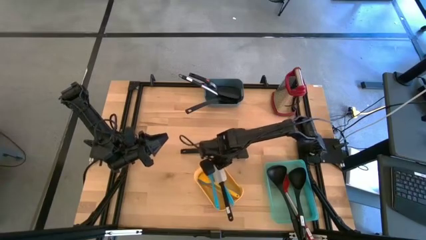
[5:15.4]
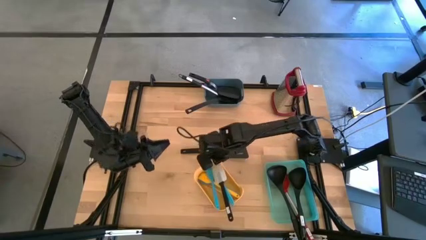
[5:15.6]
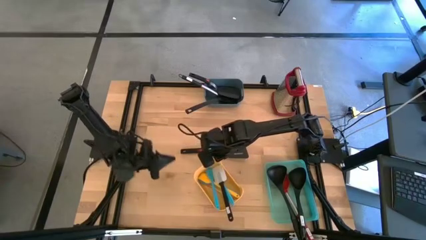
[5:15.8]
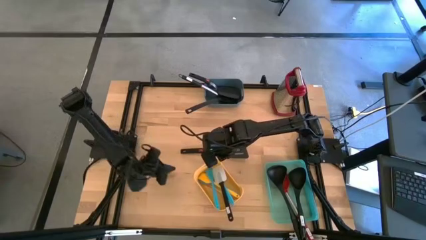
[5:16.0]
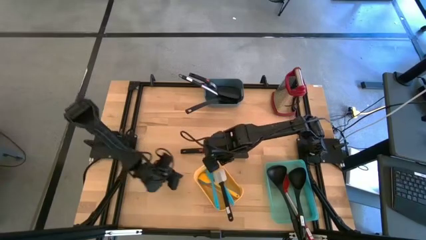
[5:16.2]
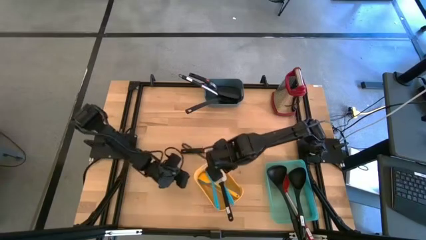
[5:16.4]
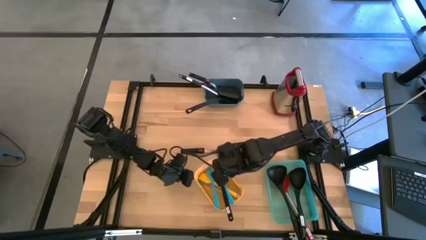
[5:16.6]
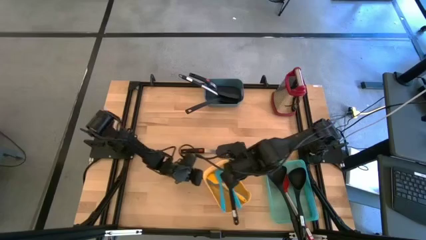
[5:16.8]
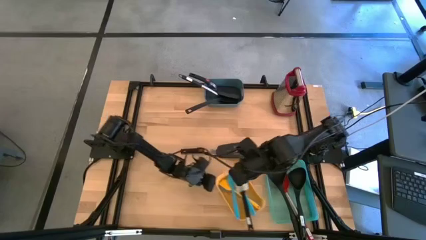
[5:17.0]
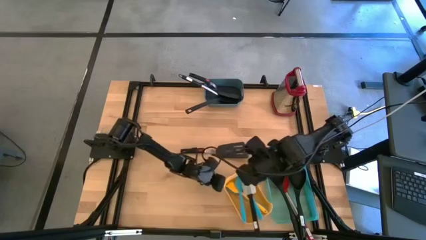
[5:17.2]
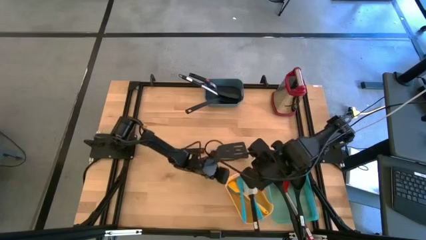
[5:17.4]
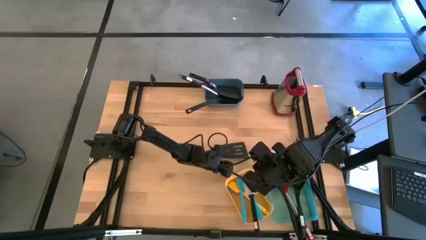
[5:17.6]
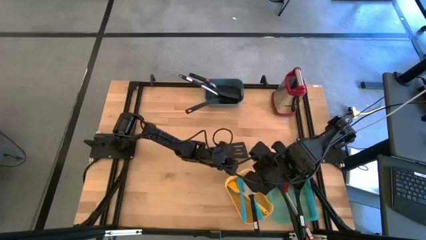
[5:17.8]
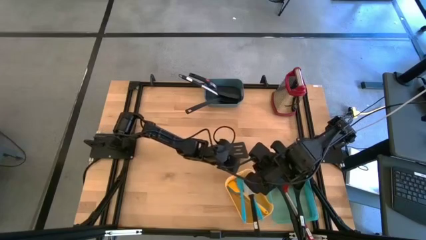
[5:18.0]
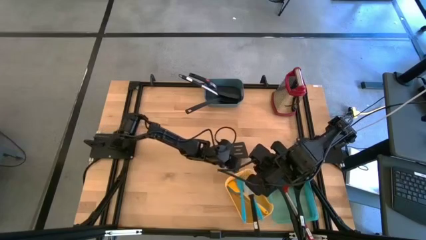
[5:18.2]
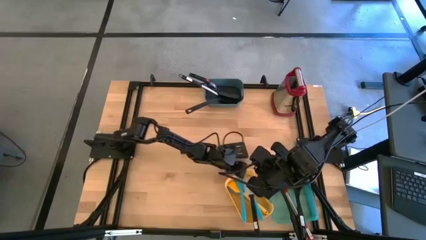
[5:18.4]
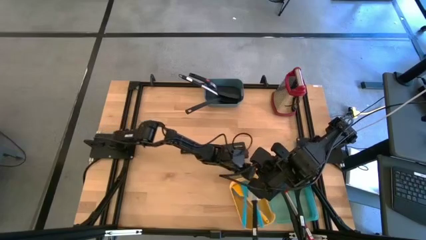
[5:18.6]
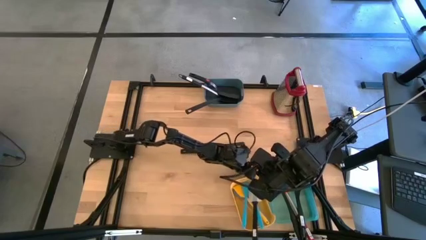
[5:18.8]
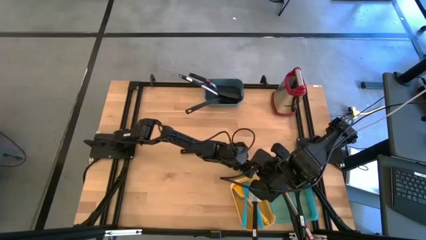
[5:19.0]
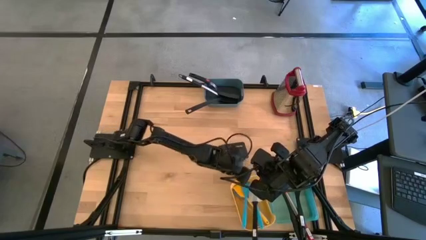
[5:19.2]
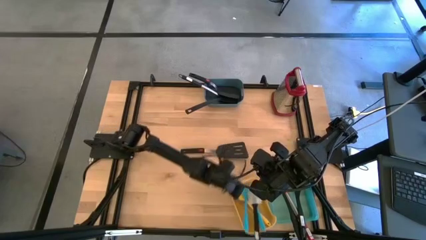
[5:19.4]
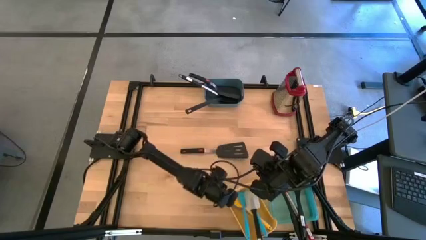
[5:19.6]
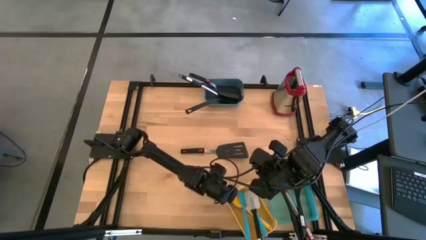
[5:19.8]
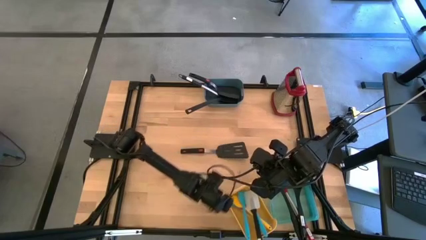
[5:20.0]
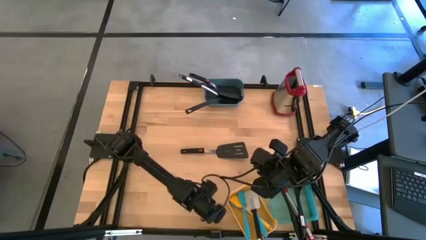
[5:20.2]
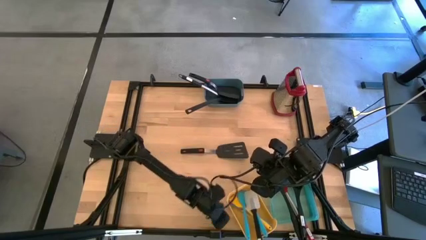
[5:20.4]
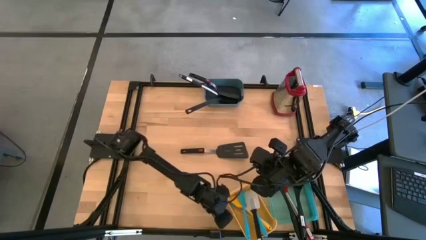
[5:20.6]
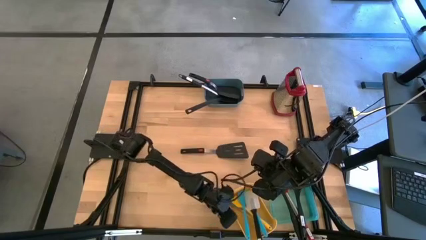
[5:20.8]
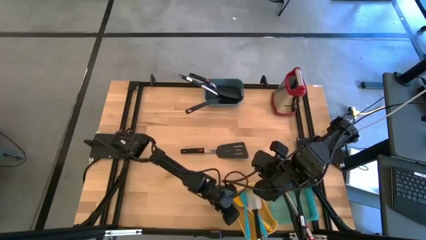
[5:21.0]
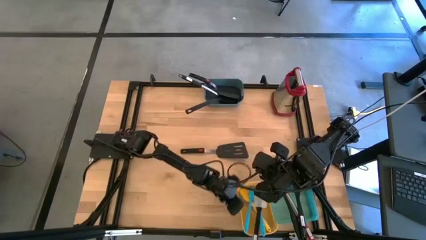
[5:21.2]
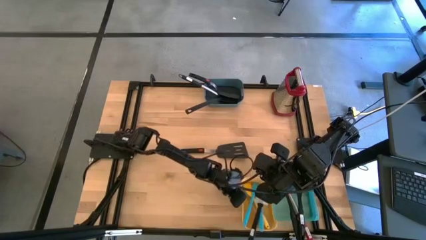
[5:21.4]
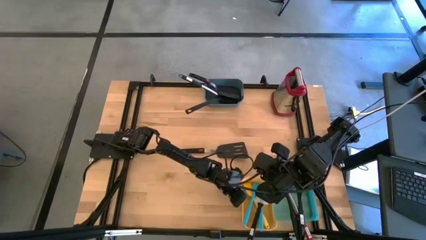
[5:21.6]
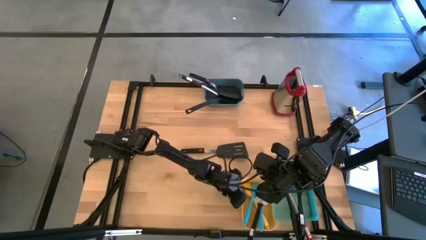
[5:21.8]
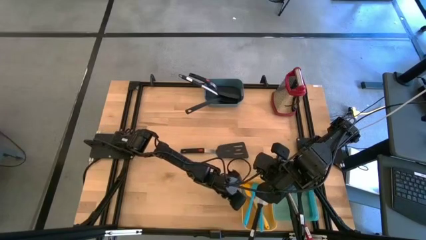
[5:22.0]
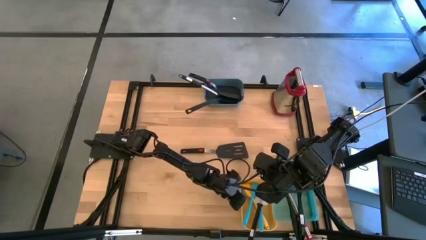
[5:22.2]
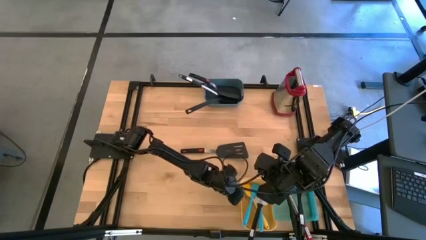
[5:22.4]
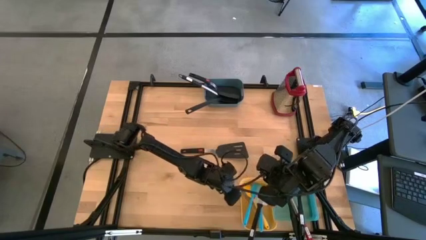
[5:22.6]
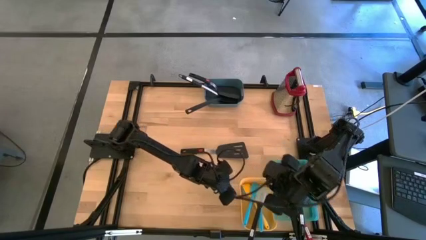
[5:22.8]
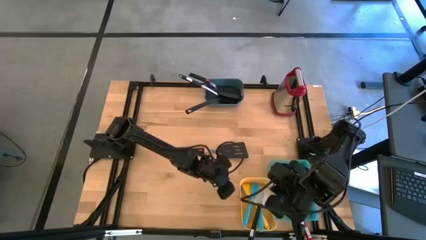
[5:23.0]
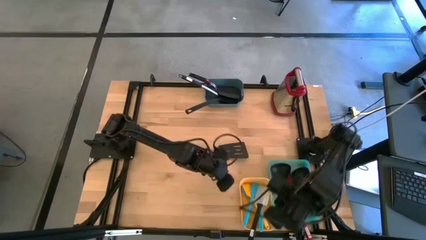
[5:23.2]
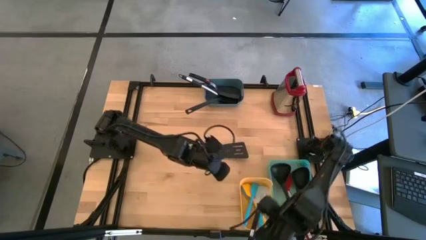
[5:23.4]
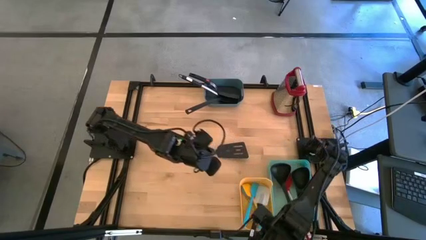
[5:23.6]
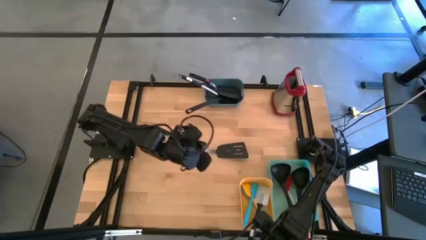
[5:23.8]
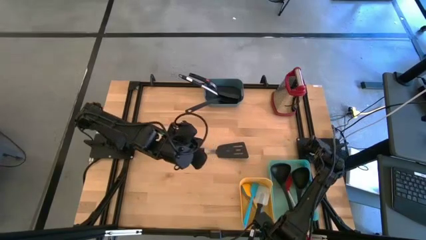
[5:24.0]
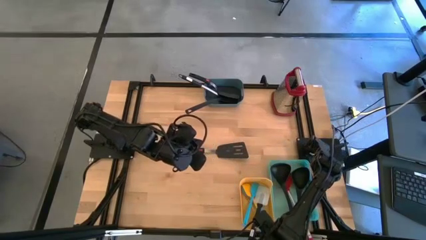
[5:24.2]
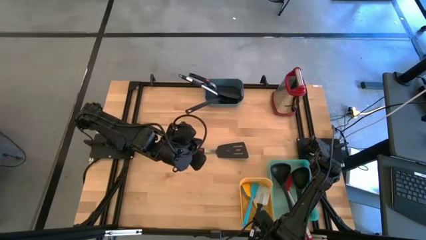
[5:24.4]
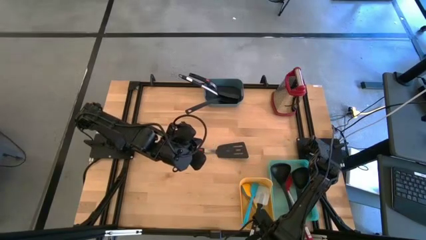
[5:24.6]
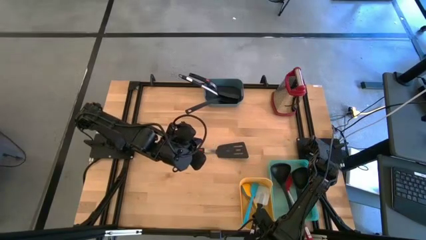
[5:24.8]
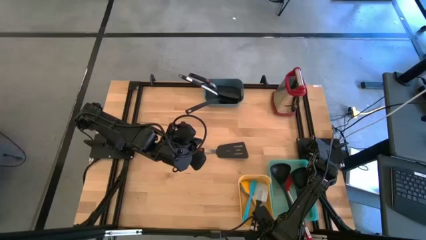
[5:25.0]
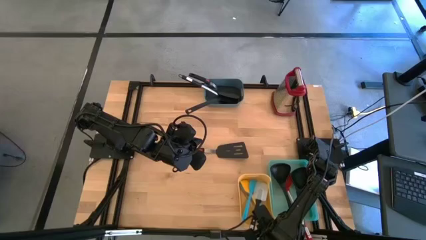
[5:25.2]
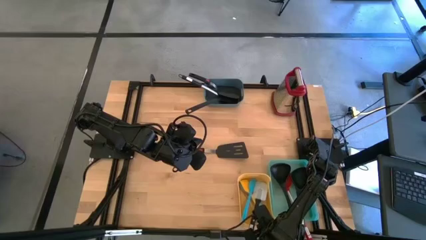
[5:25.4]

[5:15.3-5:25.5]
Task: Pick & Place Kitchen Items
Adjust the yellow bin

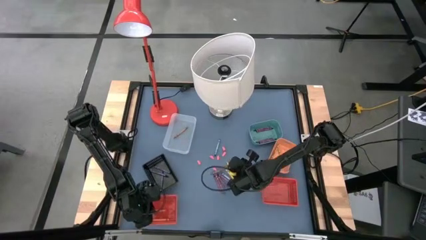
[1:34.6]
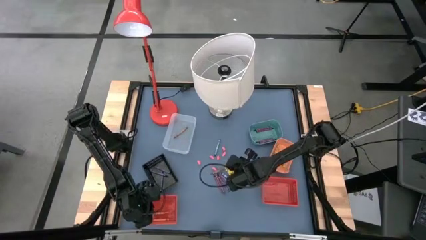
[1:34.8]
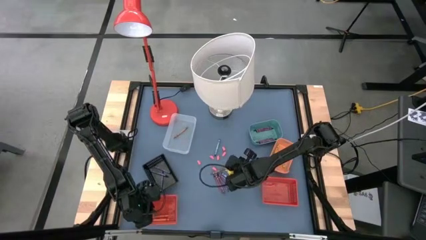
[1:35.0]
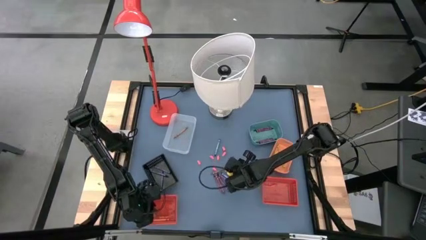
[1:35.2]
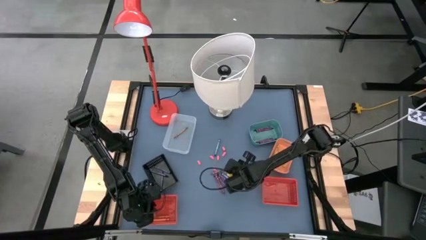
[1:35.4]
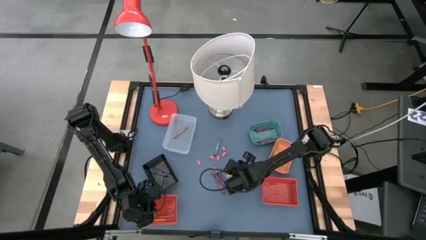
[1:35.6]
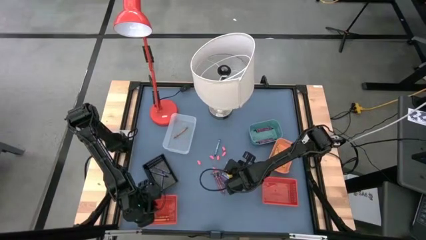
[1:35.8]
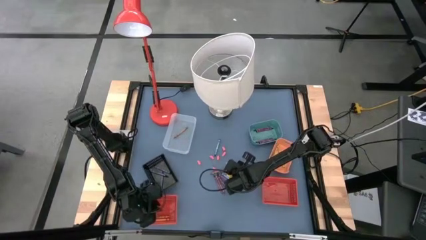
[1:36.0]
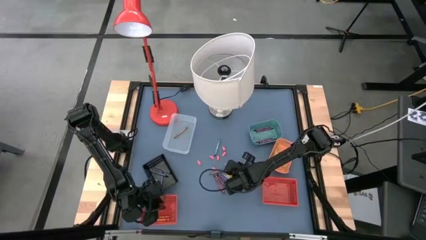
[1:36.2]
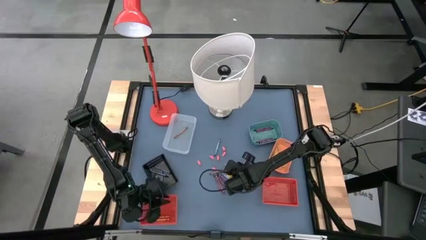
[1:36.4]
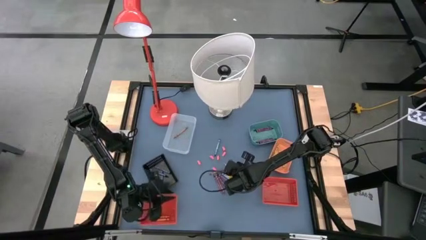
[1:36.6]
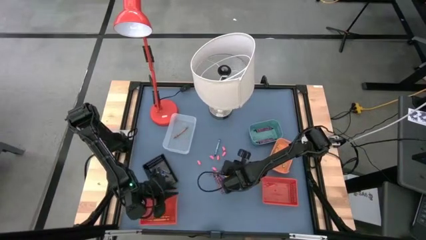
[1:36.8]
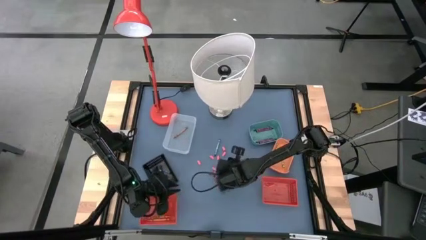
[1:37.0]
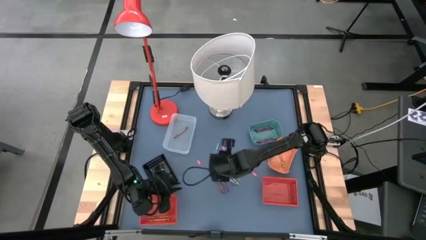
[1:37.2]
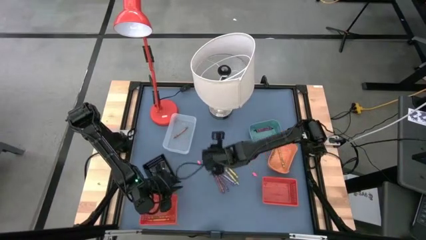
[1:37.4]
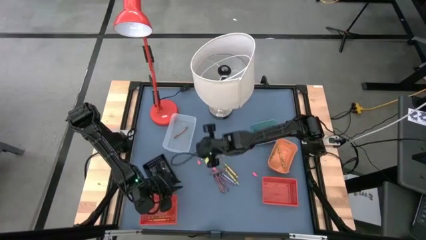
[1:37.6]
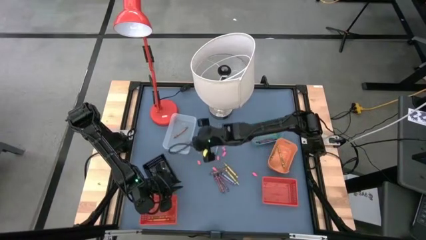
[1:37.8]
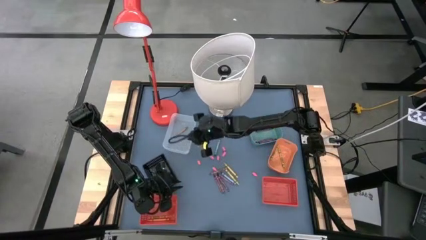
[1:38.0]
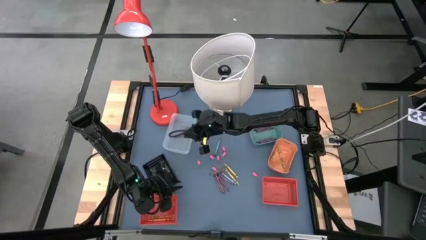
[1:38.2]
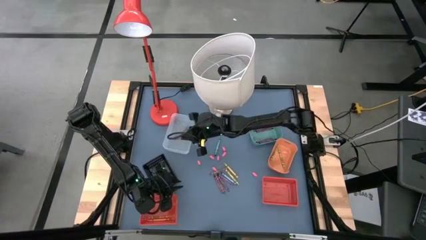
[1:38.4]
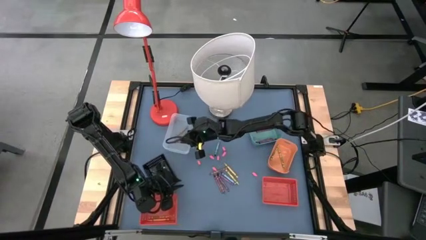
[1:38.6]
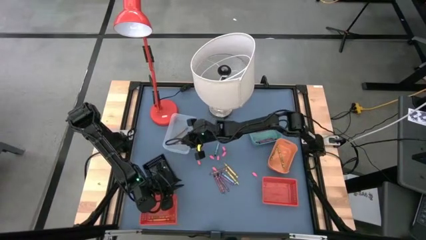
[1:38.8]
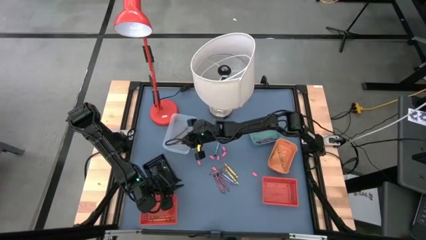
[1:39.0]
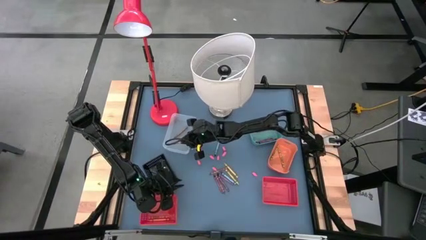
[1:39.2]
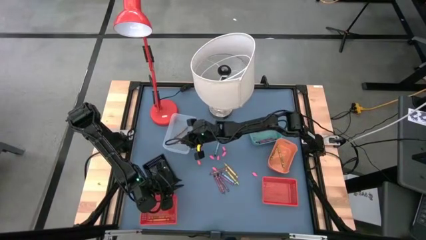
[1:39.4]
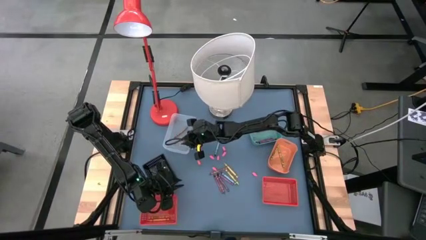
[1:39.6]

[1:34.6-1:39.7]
Task: Sort crayons
Put the brown crayon into the transparent bin
